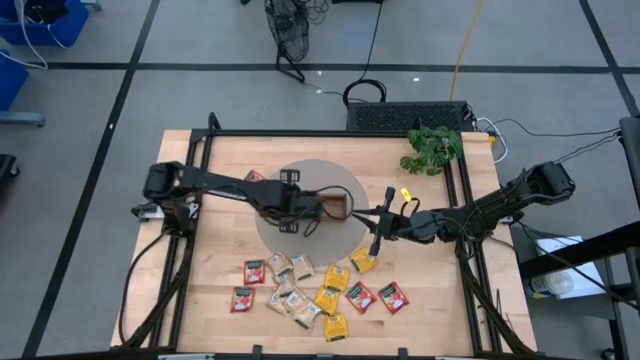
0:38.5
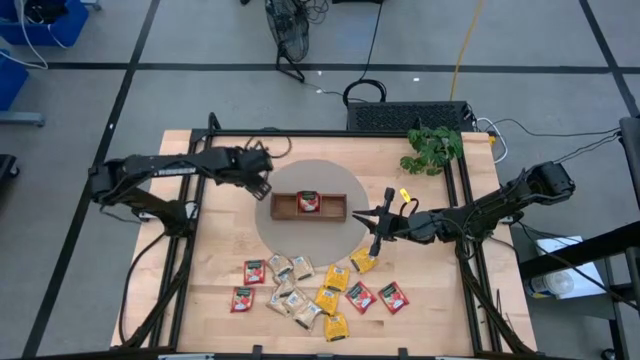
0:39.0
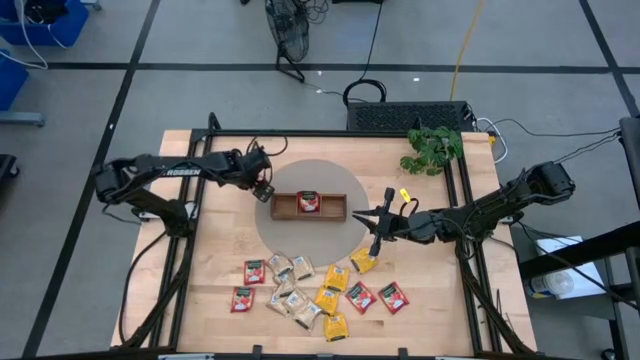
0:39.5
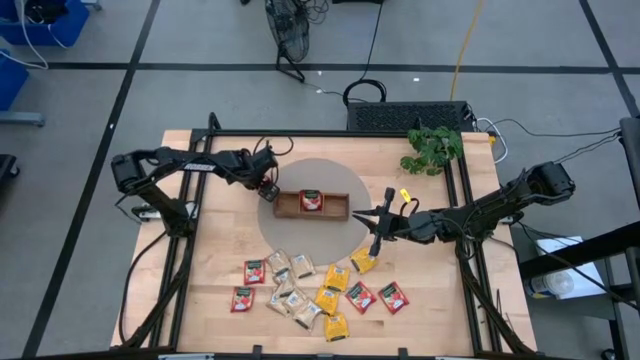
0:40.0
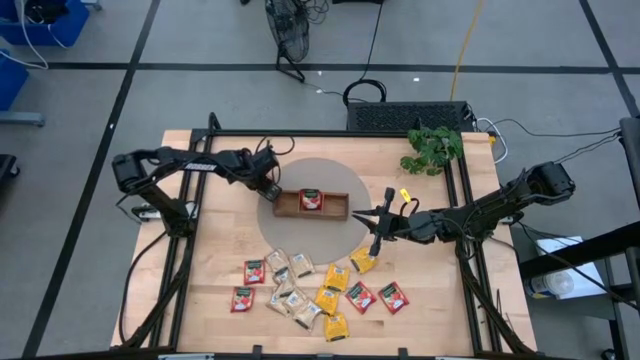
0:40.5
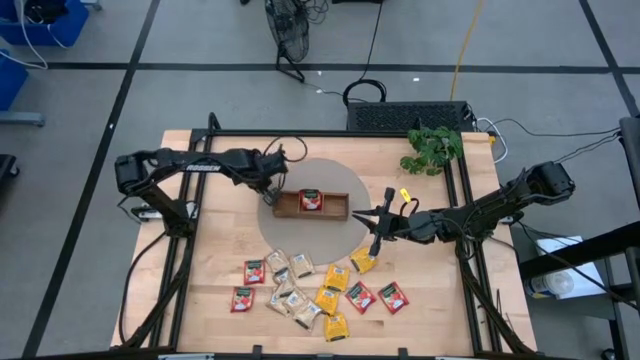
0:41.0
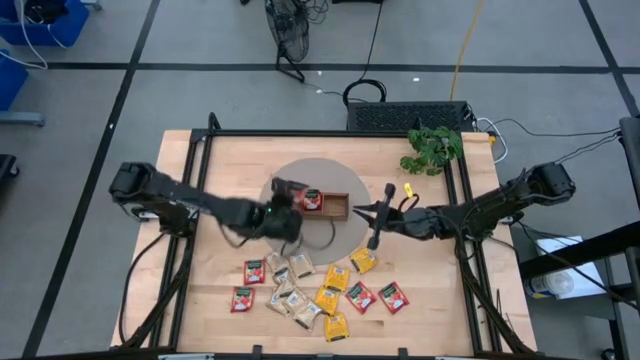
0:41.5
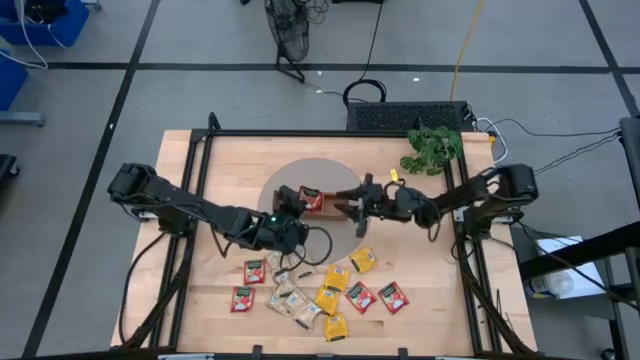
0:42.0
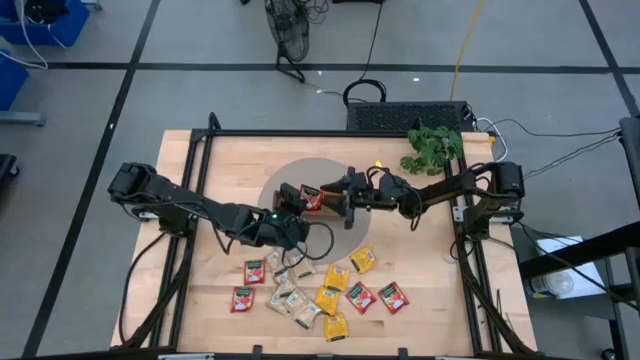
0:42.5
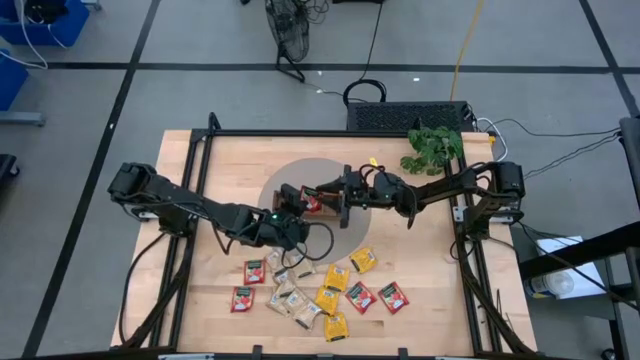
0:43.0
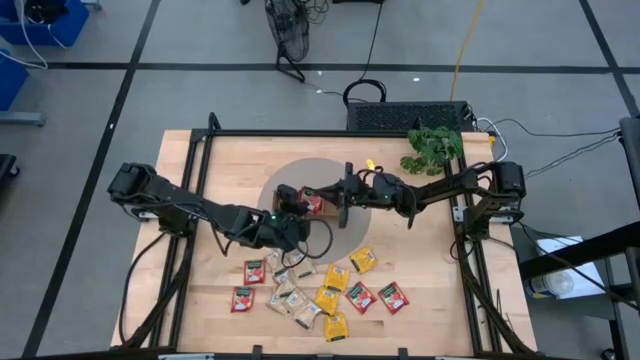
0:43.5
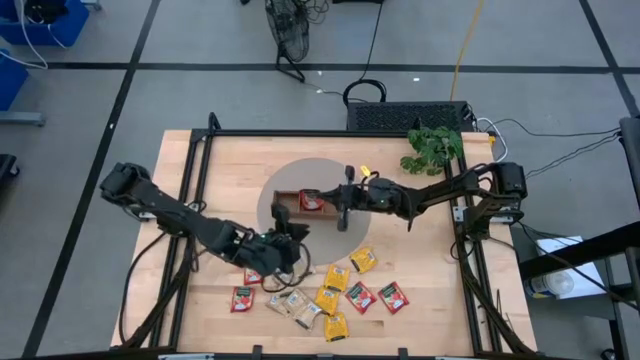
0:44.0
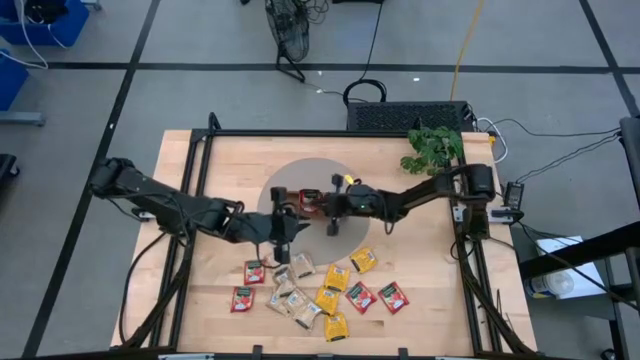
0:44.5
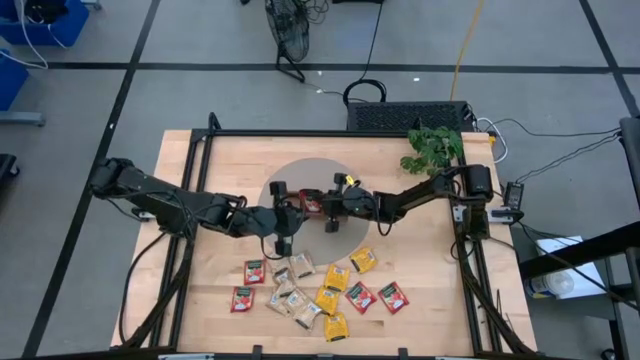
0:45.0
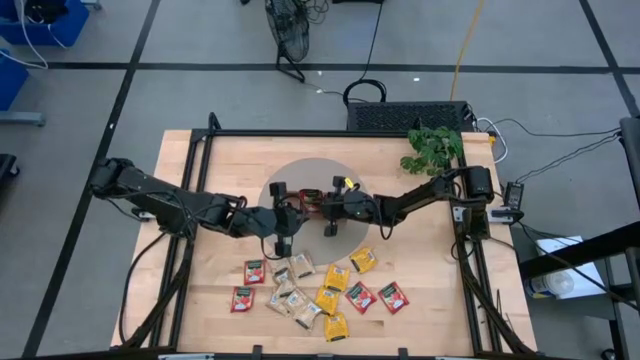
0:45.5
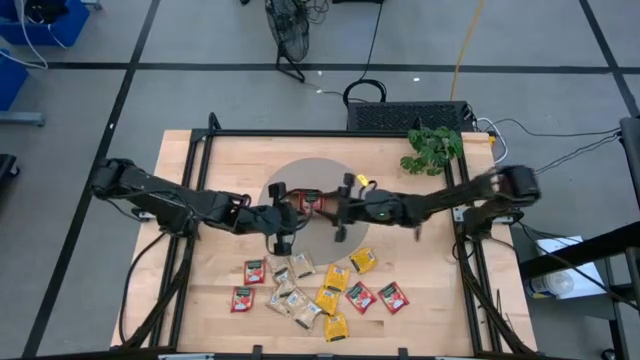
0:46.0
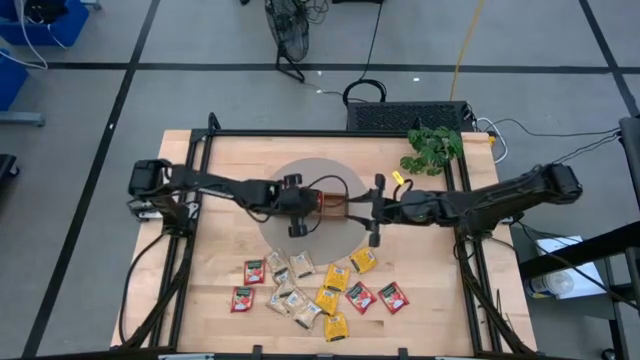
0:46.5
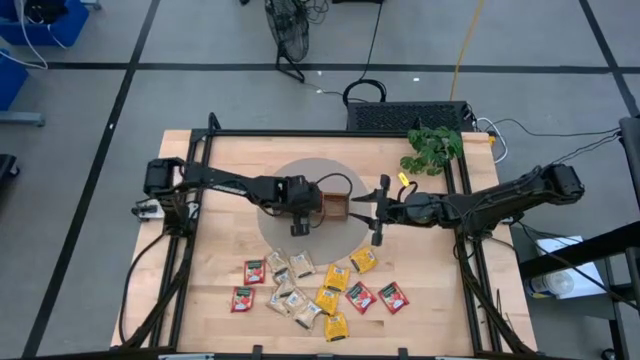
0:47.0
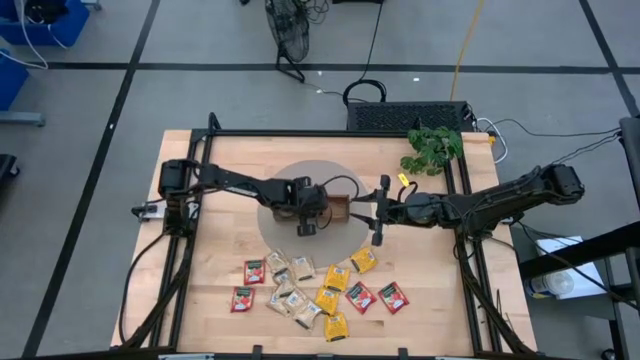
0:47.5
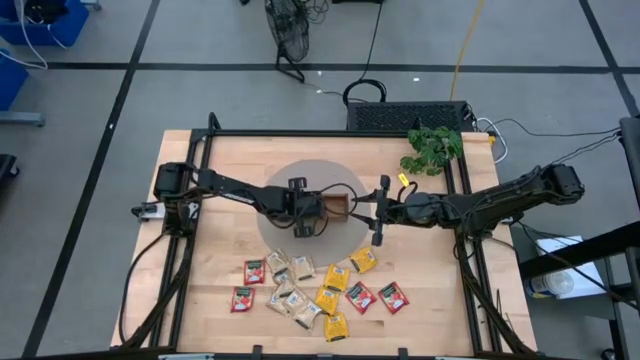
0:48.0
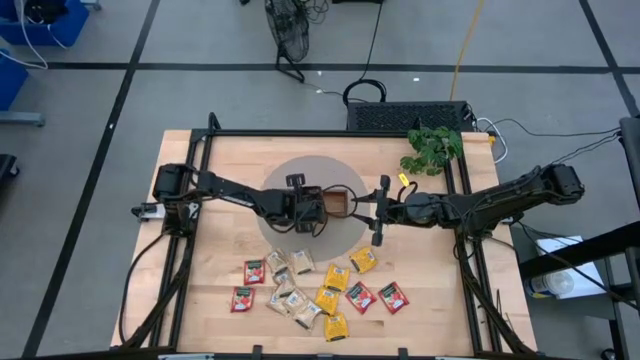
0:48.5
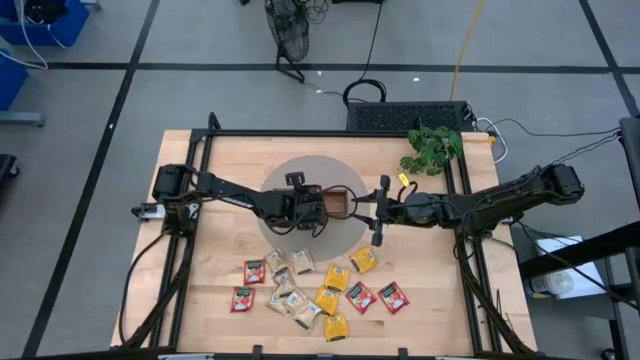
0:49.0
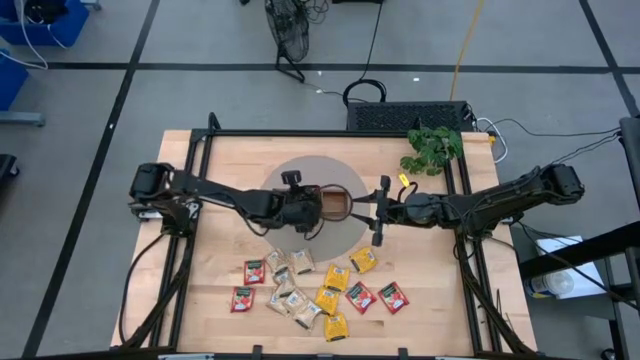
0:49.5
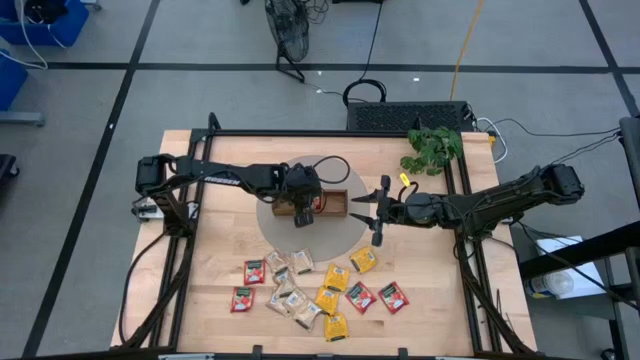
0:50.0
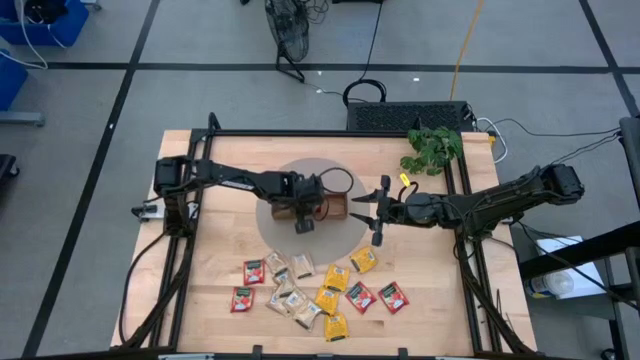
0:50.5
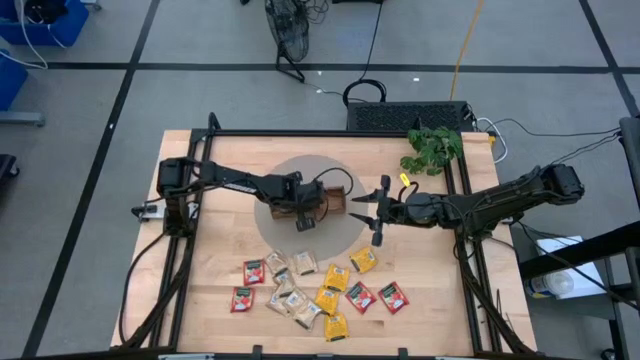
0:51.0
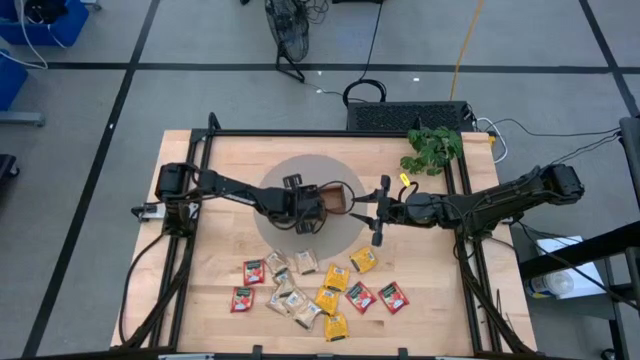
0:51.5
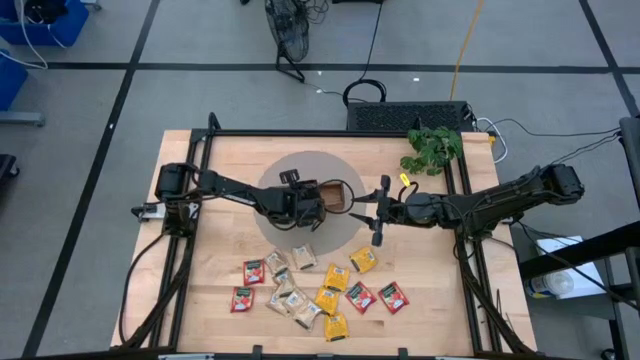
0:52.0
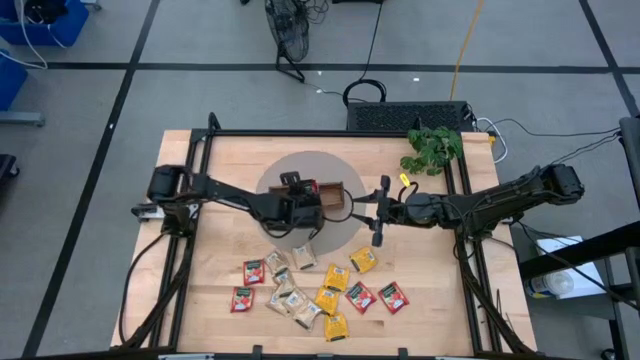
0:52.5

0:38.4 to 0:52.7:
Task: Pick & Place Tea
Put the red tea bag into the wooden organizer

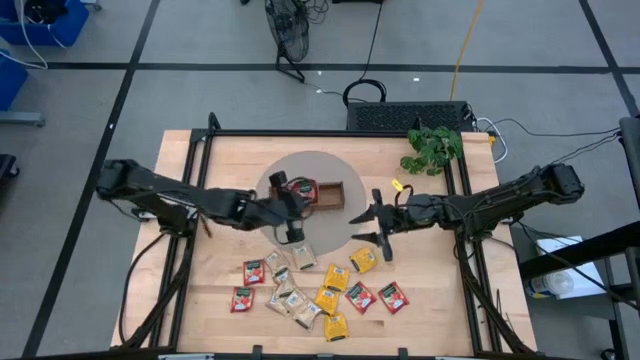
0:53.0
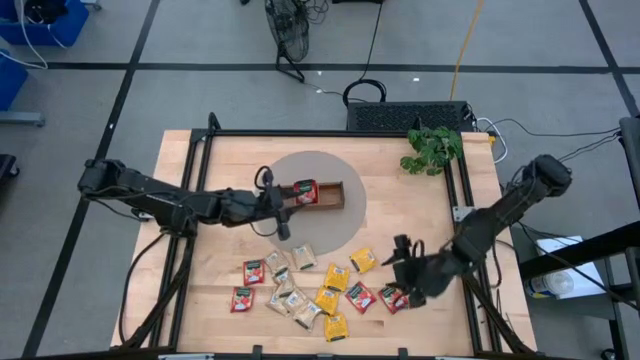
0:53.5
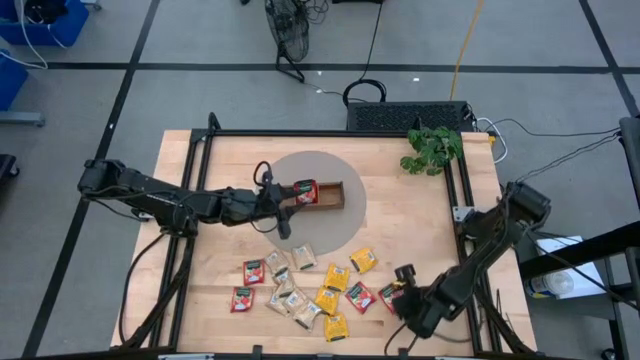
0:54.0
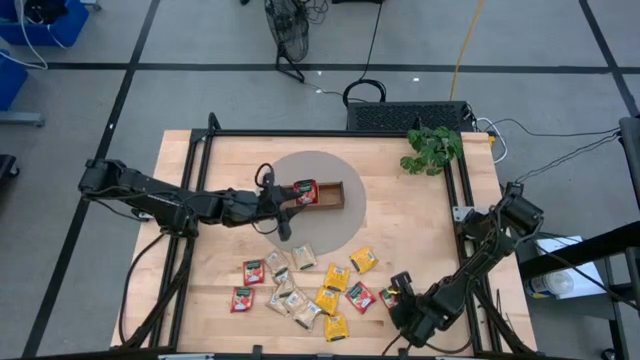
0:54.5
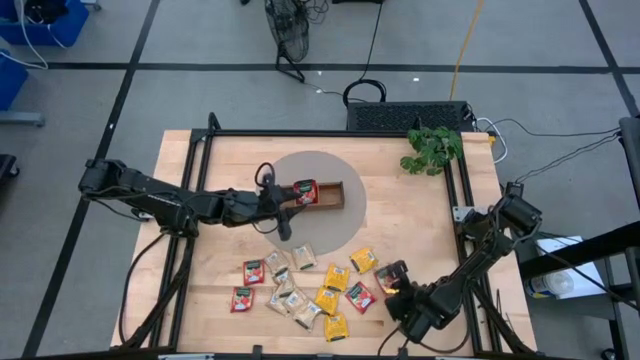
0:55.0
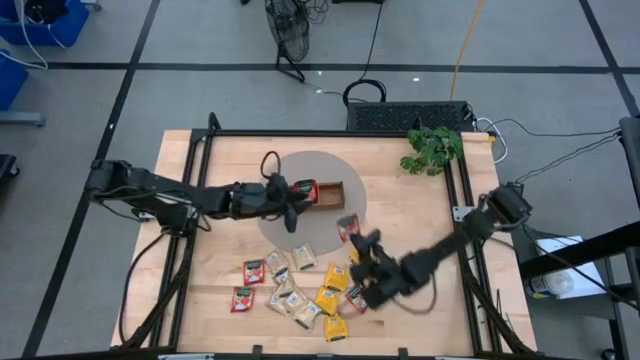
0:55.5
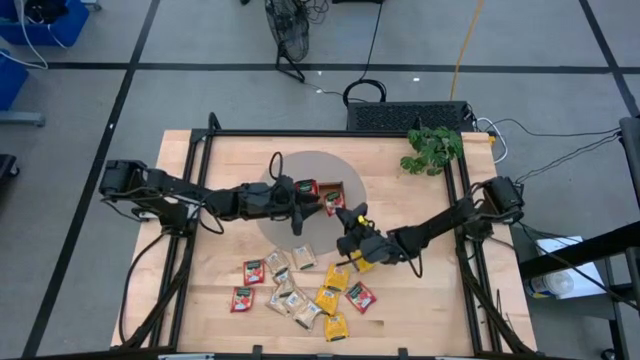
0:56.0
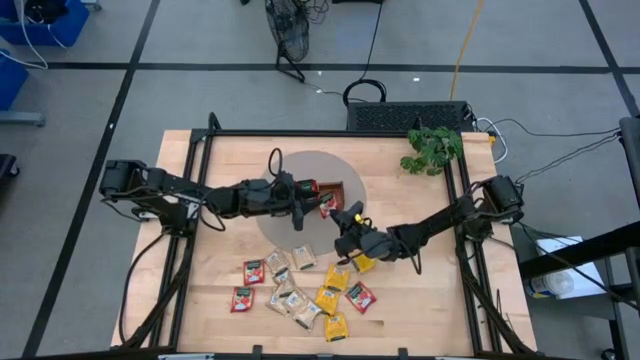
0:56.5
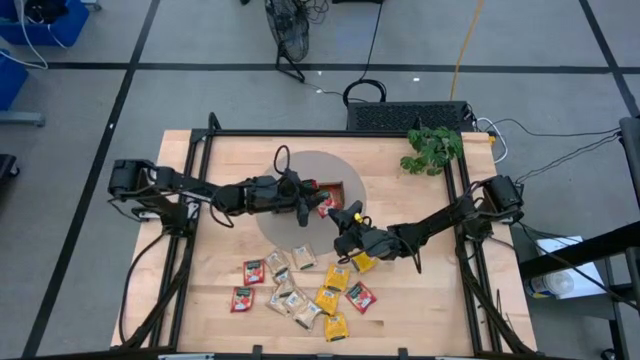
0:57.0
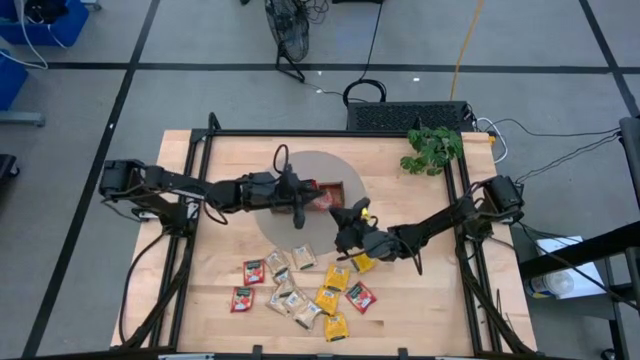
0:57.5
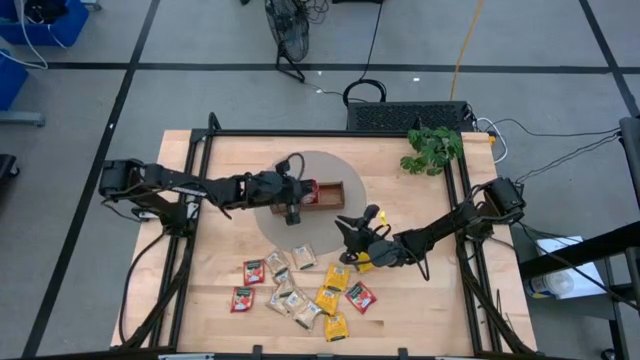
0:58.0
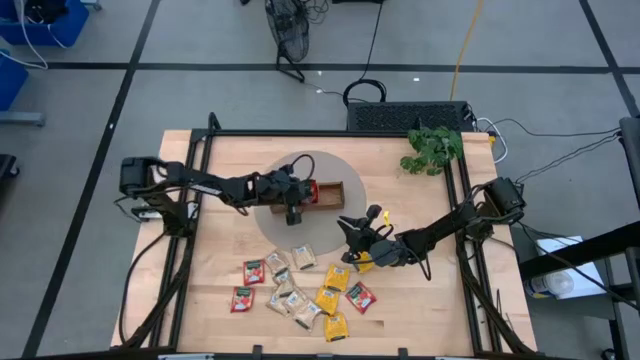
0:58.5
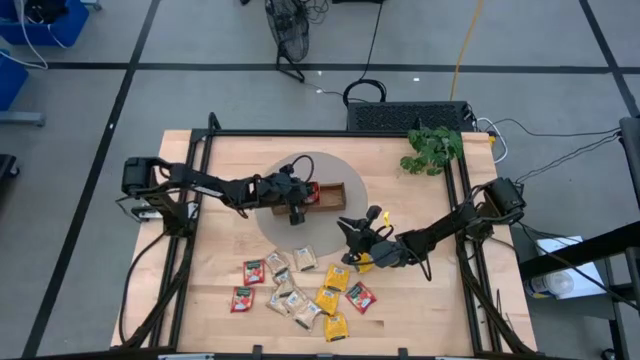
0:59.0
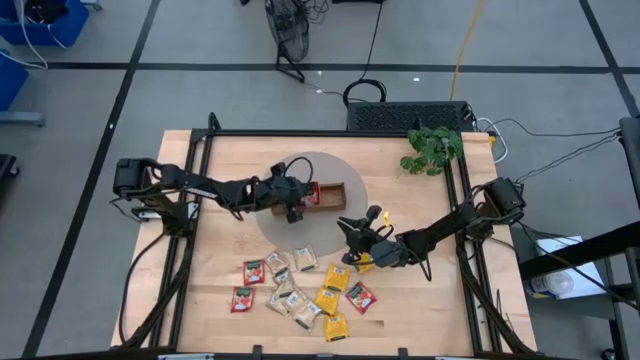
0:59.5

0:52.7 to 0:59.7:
Put the red tea bag into the wooden organizer
